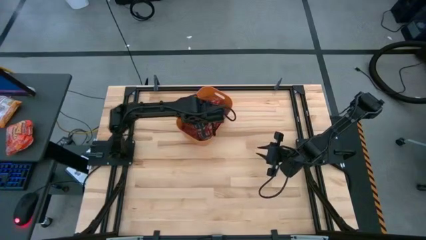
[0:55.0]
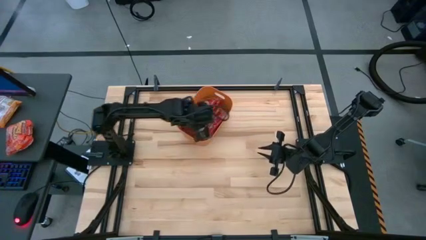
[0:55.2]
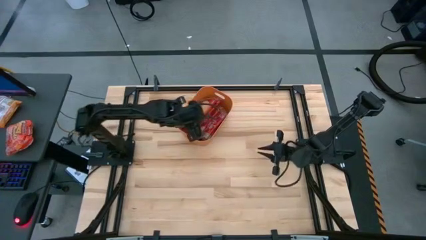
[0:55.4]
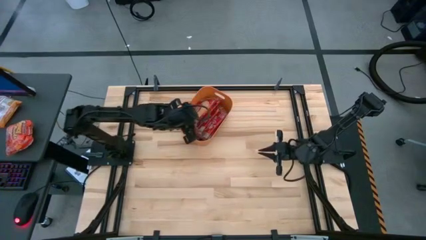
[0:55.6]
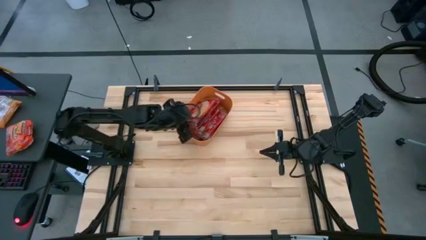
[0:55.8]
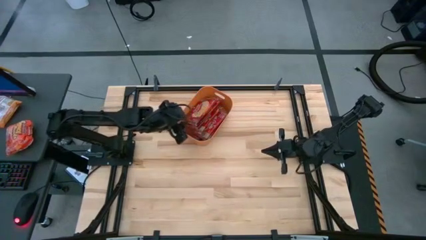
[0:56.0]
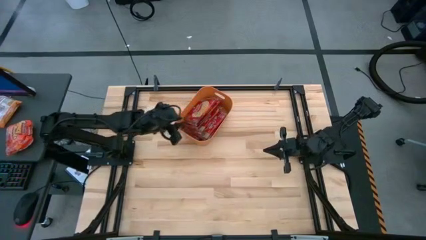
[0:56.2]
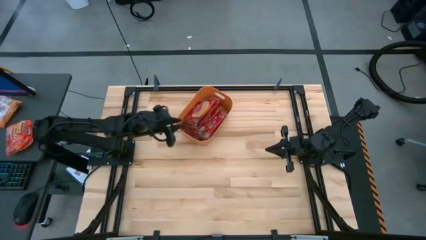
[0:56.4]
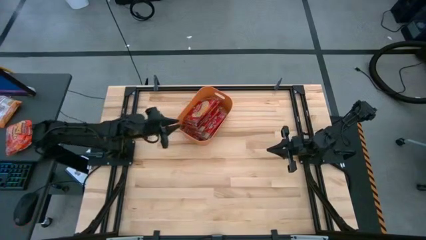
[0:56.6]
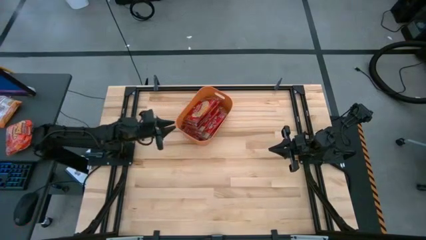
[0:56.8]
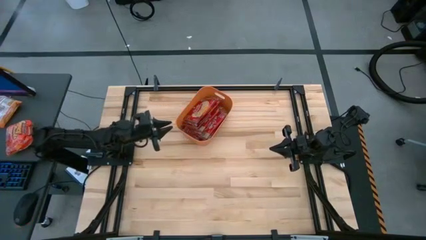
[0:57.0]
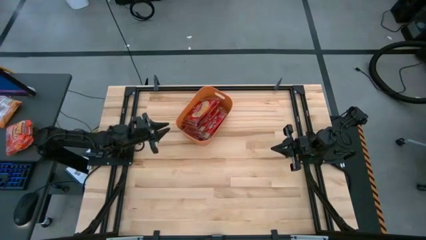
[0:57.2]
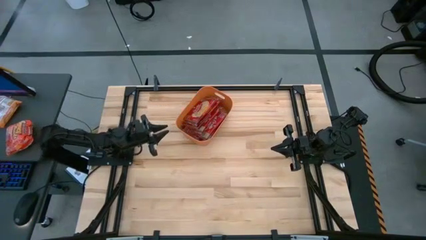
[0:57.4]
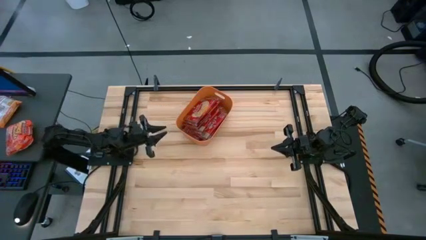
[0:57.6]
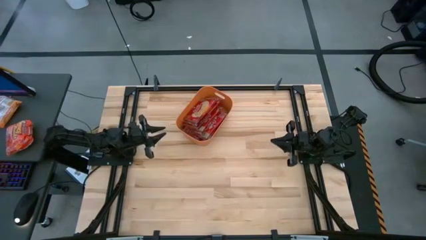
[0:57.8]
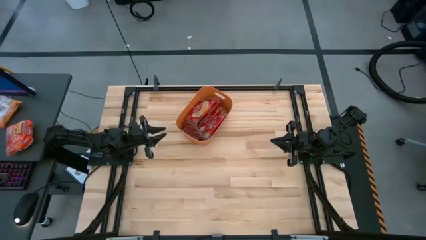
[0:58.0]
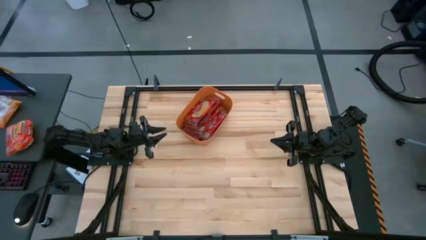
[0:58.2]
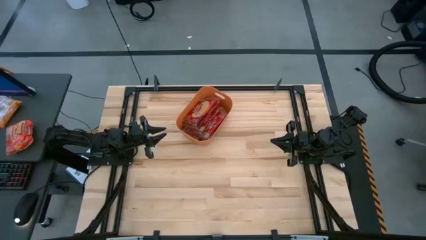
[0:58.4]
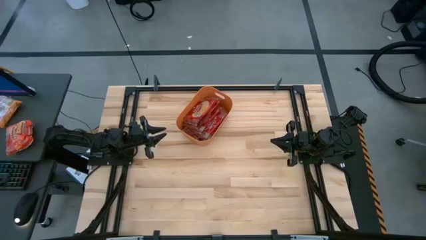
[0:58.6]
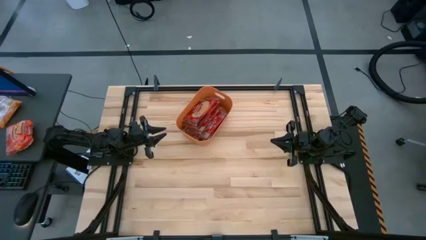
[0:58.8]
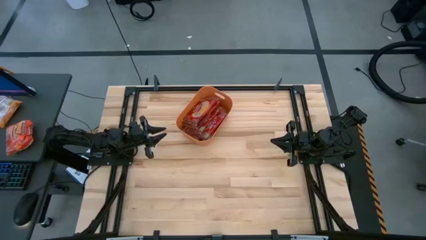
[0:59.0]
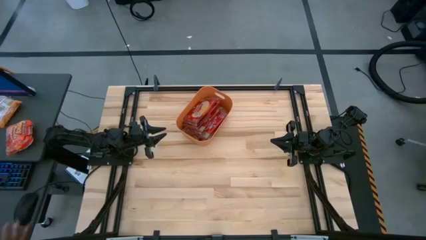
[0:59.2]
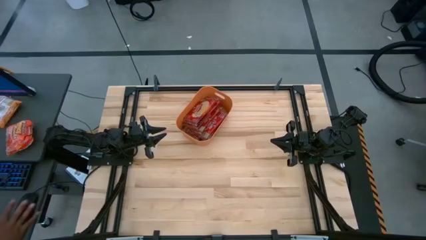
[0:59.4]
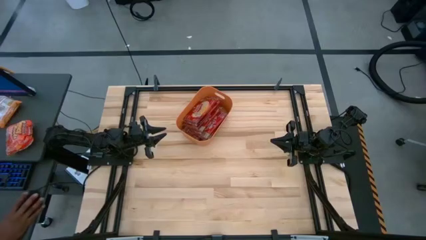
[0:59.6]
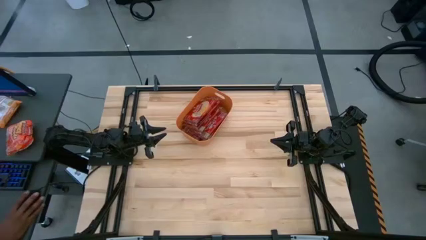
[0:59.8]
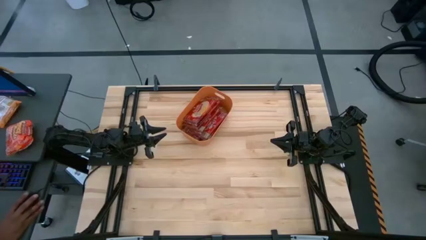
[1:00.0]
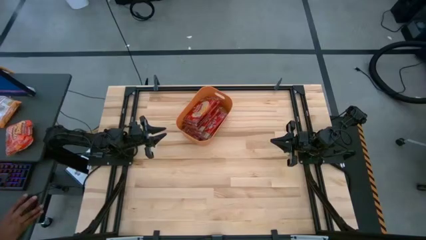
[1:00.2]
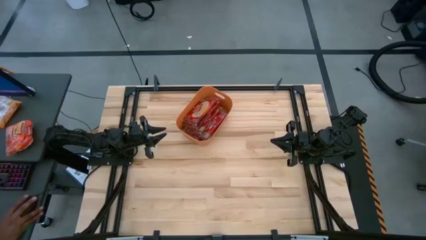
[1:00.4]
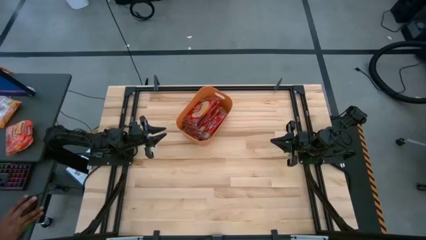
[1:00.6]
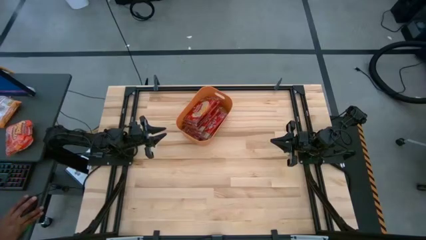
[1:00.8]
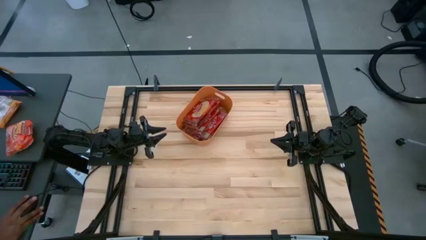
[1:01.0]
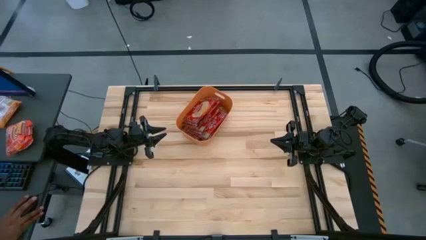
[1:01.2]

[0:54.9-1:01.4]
Task: Sort popcorn bags into baskets
Return to Home Position

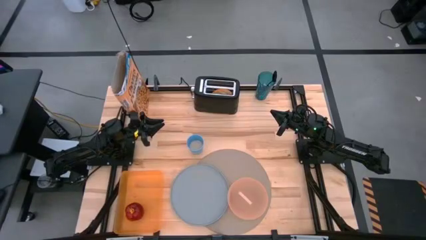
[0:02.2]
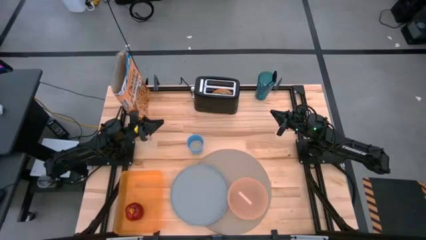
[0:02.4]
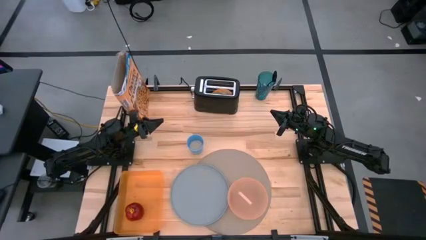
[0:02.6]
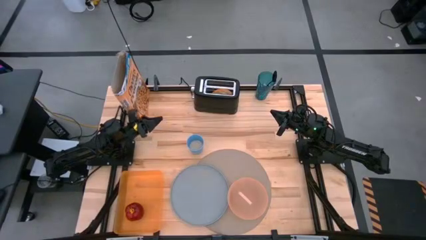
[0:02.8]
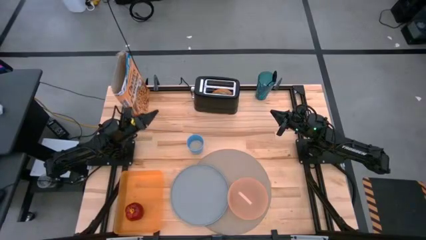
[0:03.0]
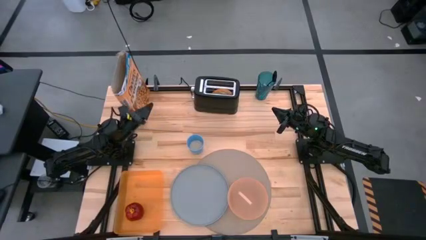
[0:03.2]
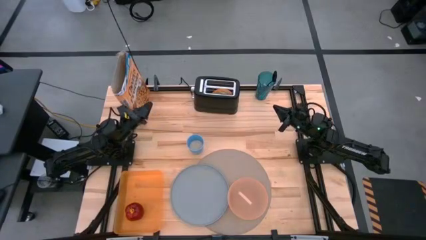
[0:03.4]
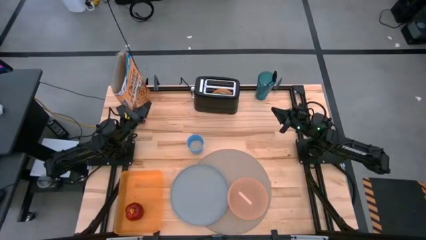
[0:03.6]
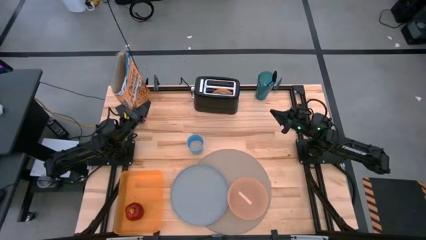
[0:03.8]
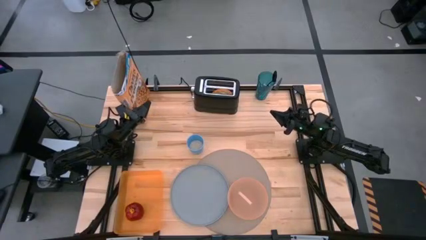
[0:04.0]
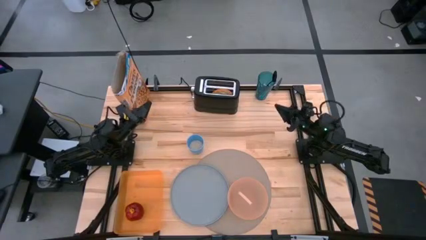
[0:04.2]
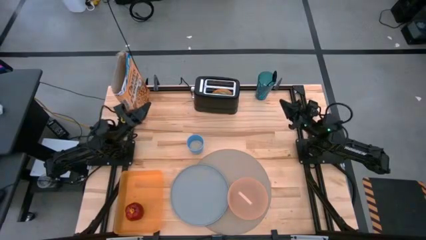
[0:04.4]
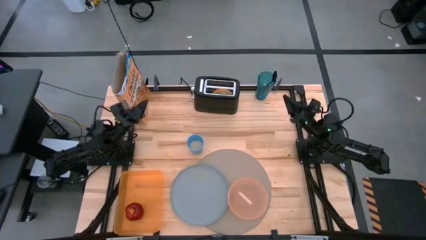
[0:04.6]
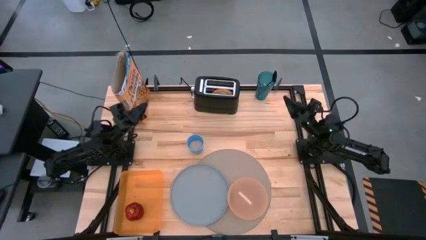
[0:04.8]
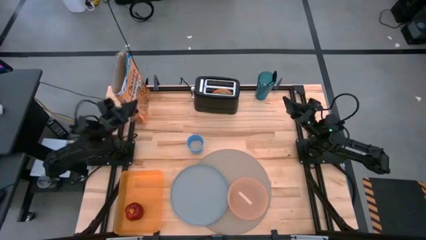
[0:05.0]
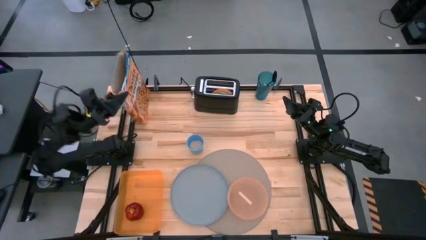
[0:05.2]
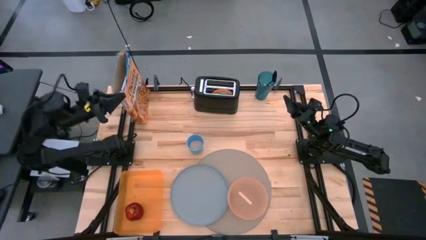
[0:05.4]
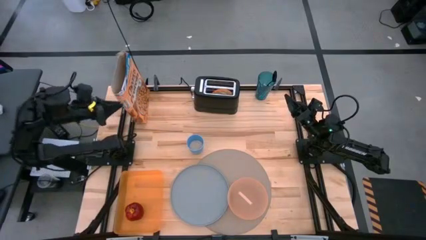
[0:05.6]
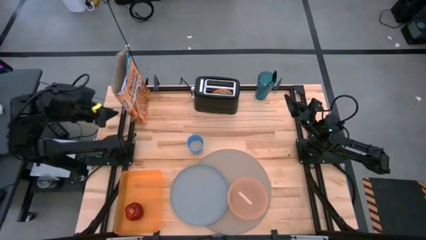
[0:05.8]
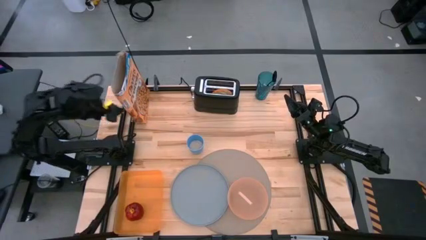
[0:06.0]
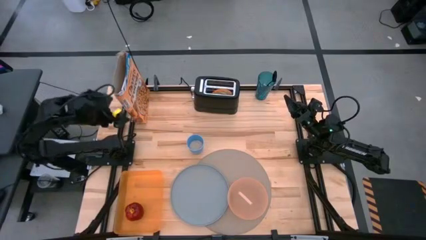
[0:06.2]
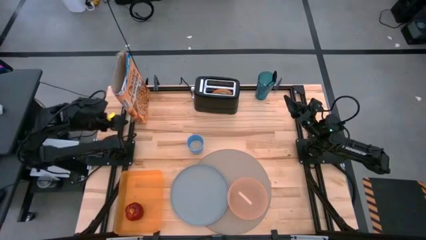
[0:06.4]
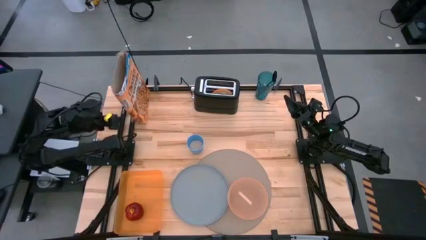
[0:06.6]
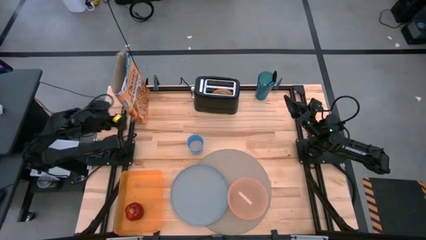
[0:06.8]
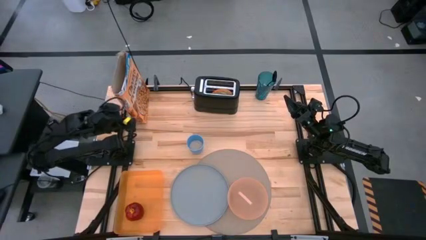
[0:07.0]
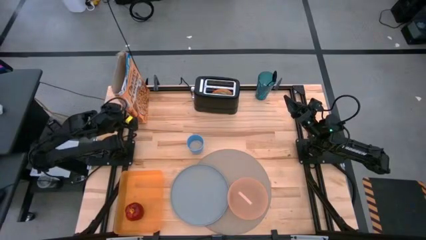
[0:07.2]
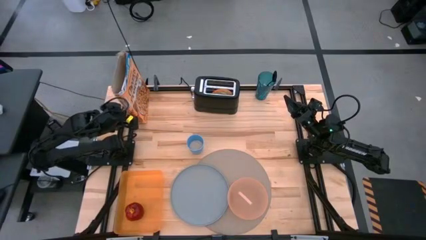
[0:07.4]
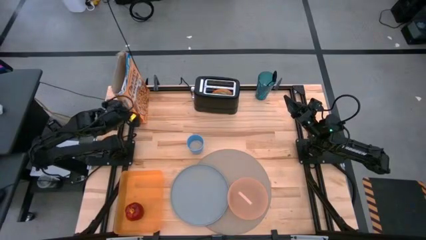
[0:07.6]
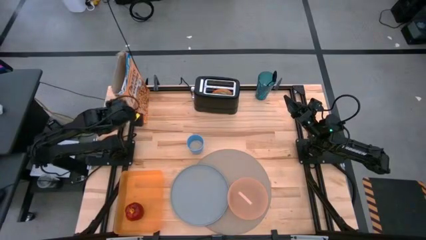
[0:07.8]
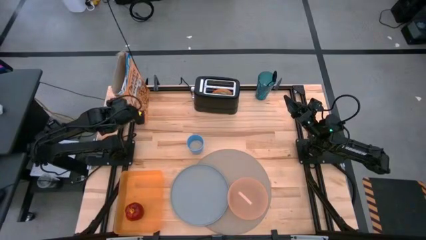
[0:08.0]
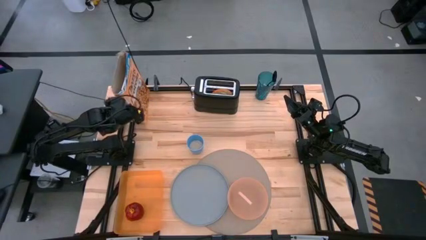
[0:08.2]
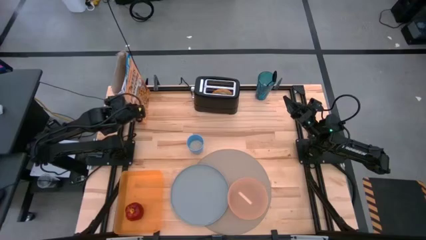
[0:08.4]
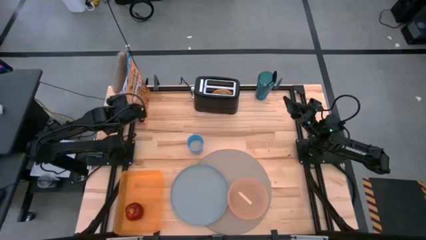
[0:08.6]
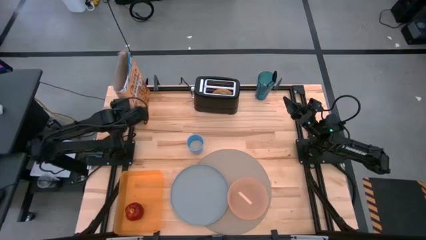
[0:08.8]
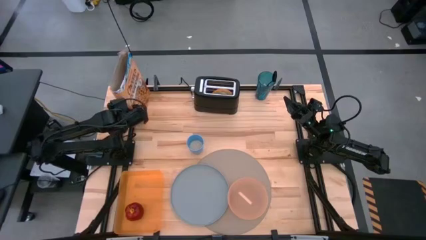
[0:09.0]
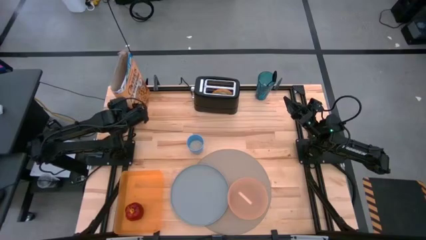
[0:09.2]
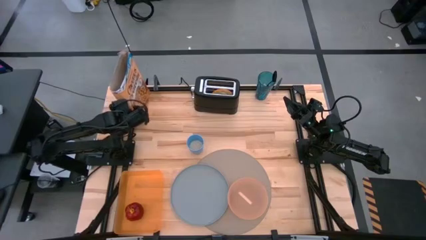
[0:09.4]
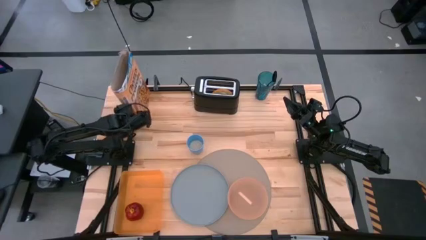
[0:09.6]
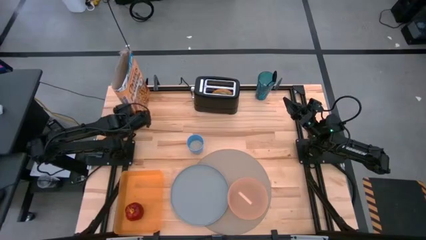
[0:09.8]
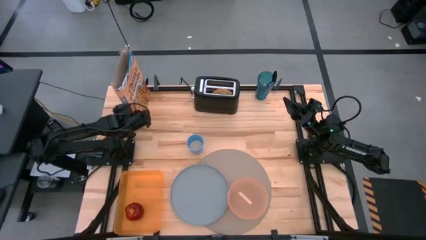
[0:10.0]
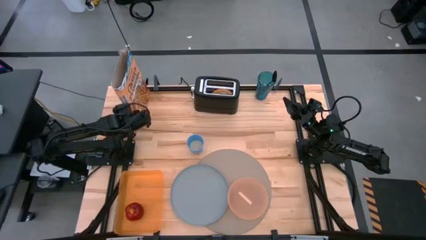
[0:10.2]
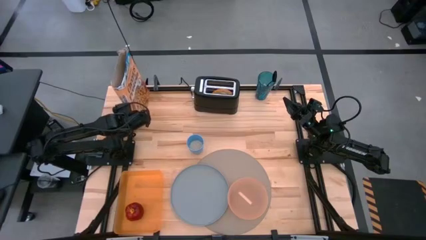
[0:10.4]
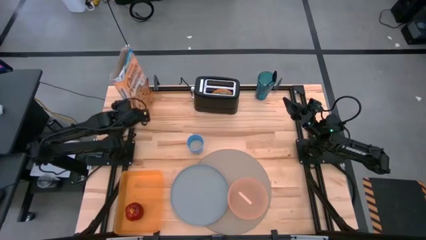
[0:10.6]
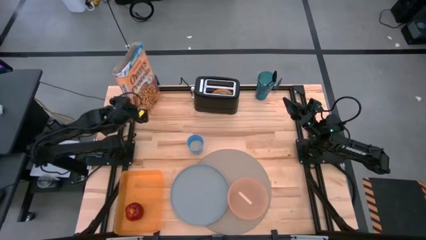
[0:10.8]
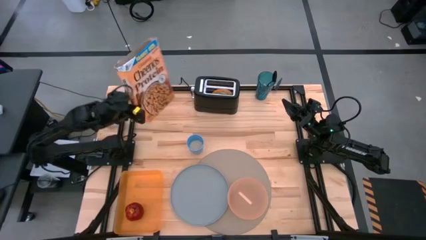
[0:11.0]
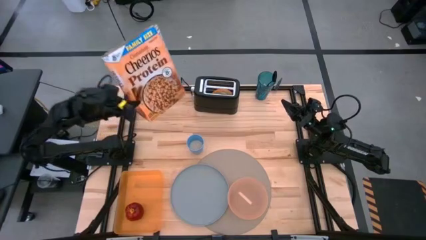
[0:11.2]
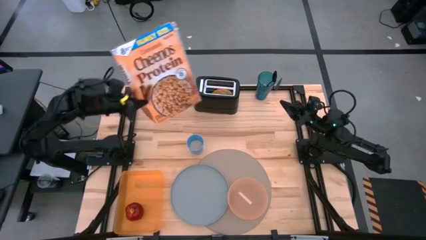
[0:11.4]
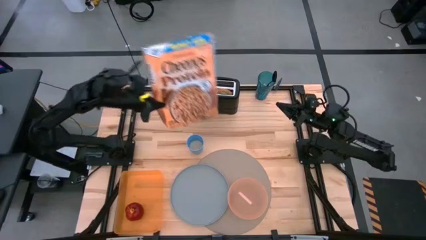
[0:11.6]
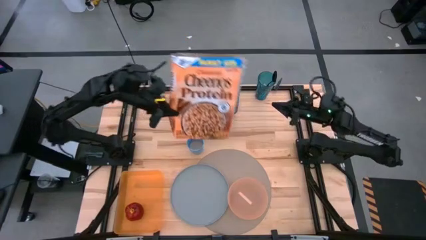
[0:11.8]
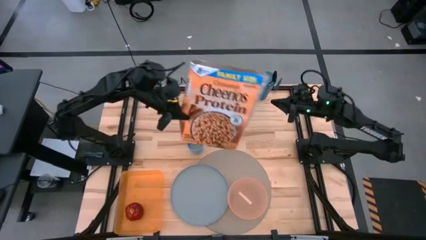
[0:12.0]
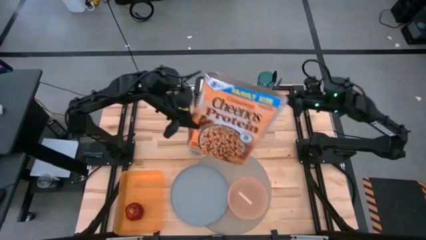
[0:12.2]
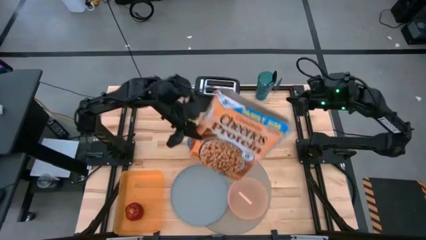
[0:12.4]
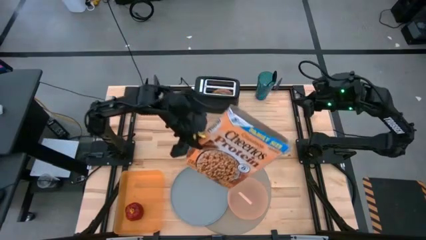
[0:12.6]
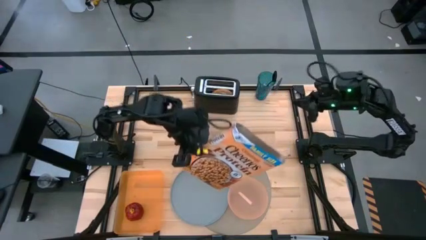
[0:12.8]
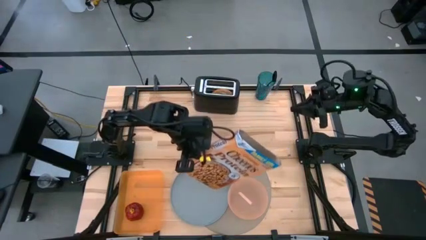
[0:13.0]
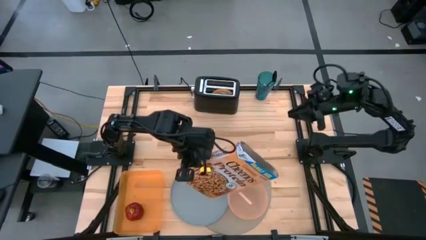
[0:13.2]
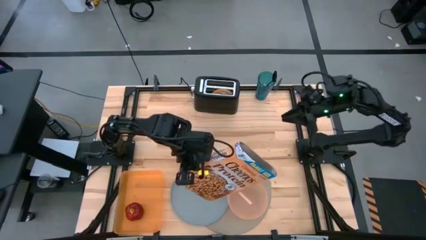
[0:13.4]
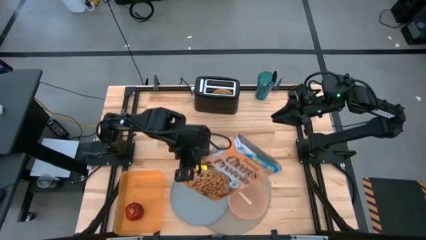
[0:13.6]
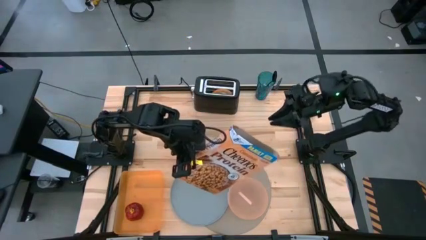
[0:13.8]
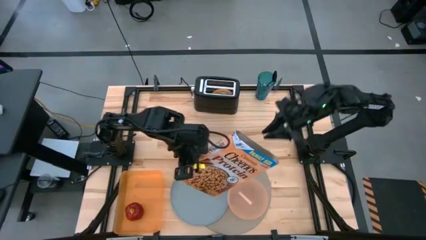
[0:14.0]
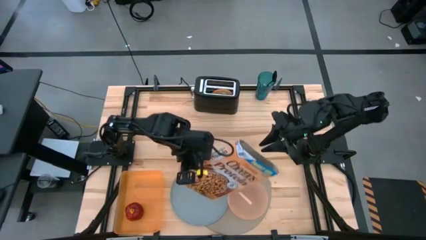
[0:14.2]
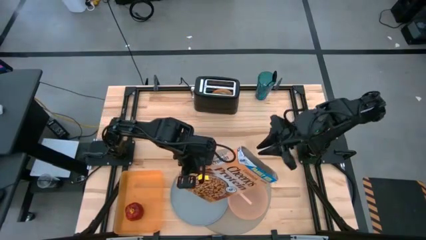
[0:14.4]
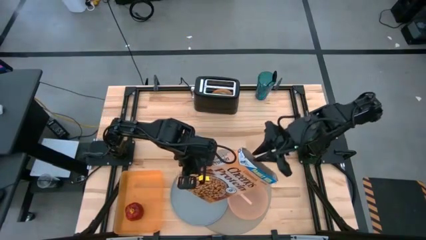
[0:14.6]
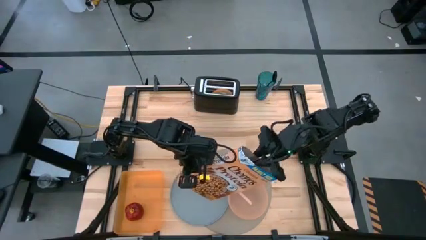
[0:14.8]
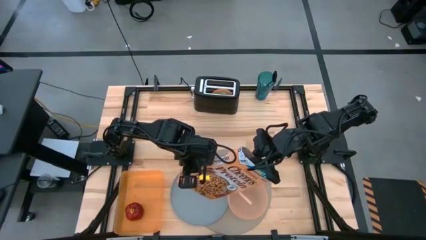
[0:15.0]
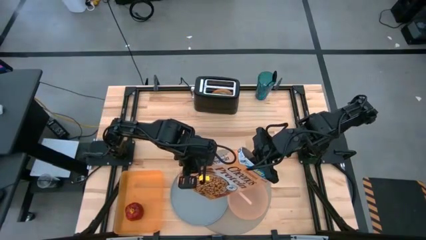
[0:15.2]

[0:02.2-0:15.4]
Task: Arrange a breakfast setting
Pour the cereal from the cereal box into the orange bowl
